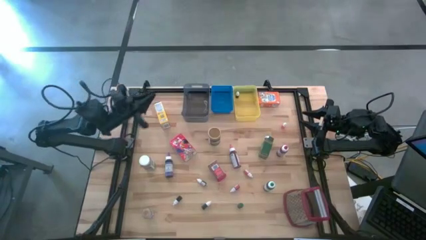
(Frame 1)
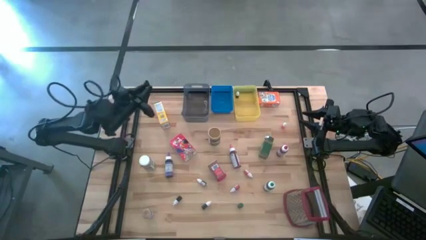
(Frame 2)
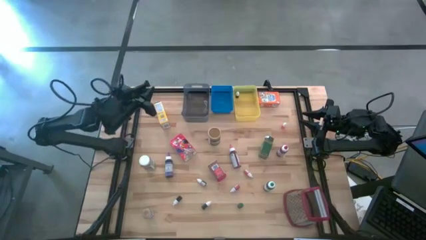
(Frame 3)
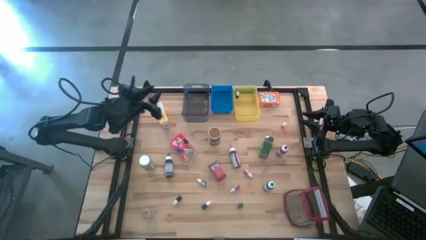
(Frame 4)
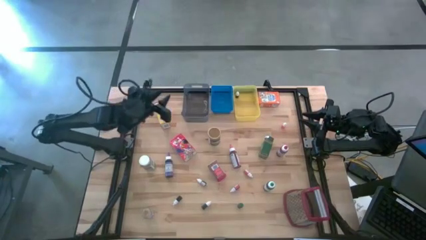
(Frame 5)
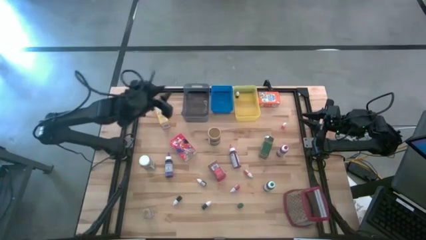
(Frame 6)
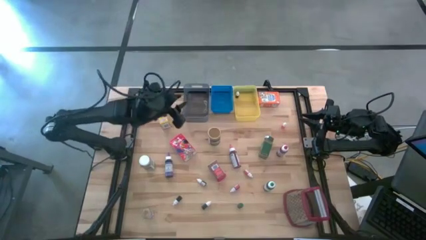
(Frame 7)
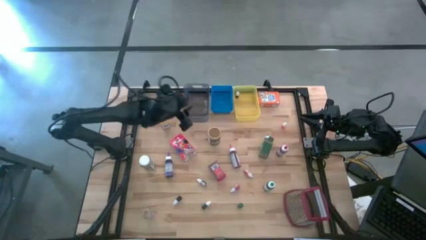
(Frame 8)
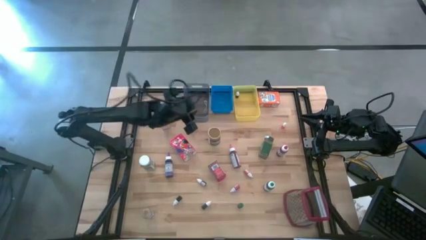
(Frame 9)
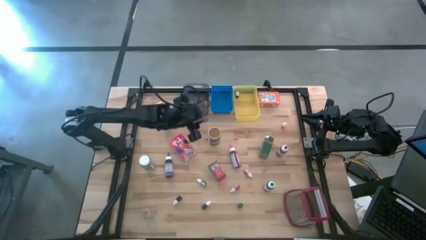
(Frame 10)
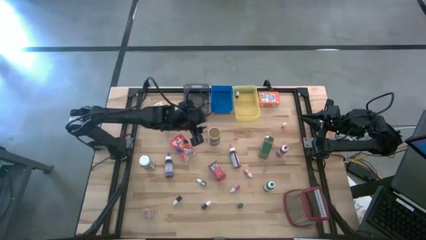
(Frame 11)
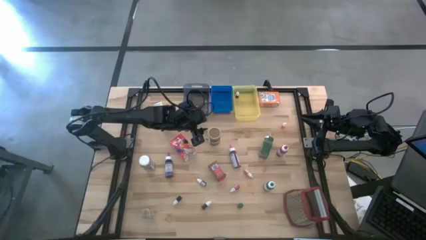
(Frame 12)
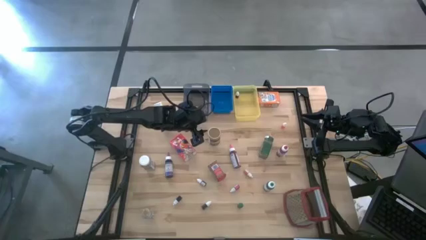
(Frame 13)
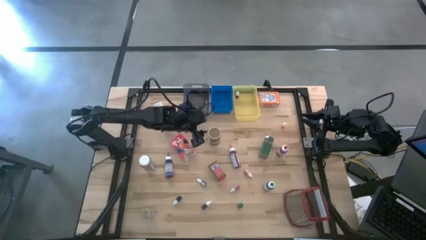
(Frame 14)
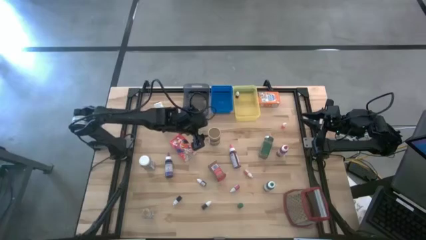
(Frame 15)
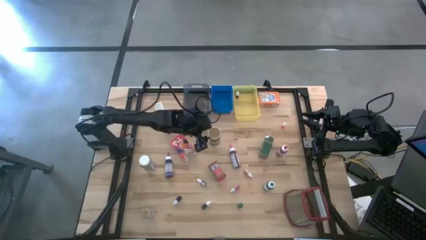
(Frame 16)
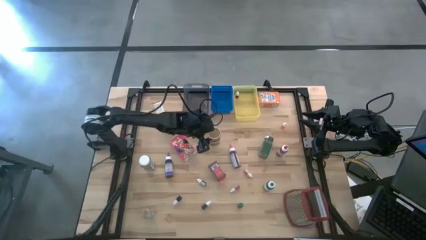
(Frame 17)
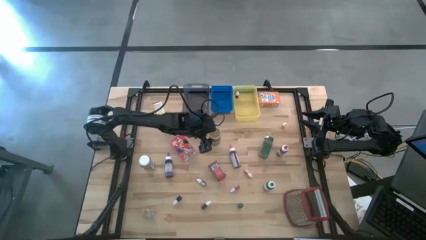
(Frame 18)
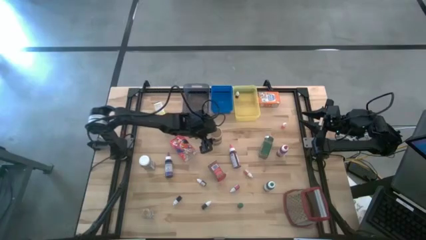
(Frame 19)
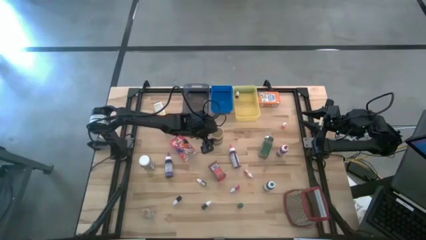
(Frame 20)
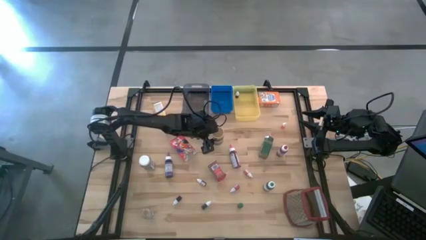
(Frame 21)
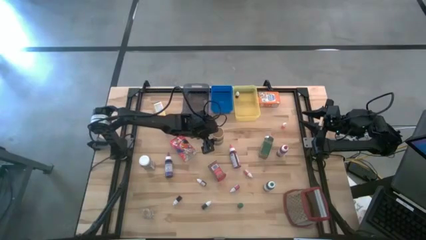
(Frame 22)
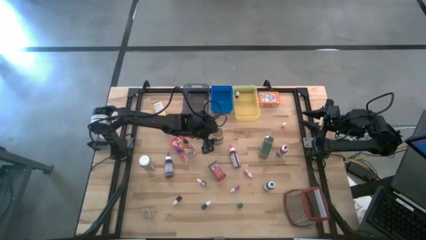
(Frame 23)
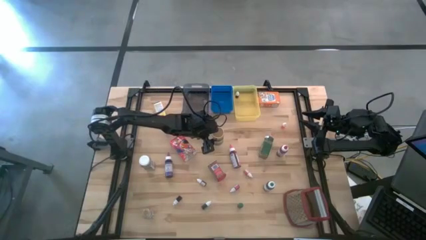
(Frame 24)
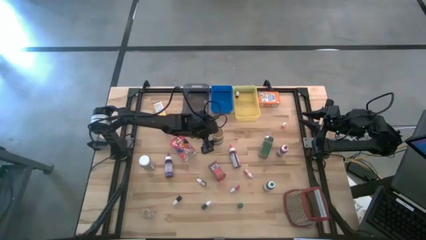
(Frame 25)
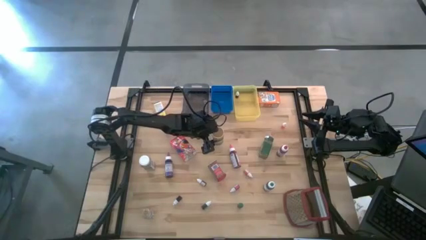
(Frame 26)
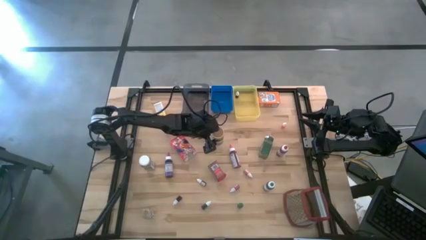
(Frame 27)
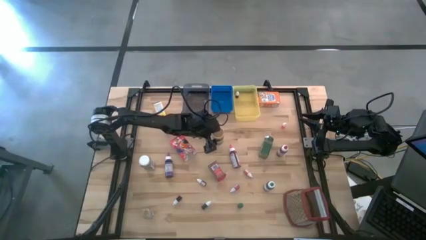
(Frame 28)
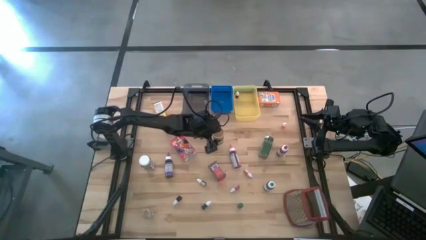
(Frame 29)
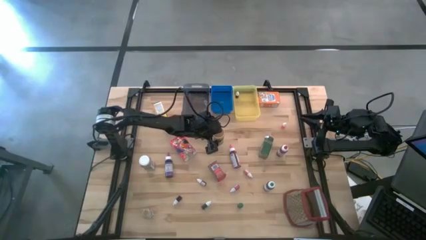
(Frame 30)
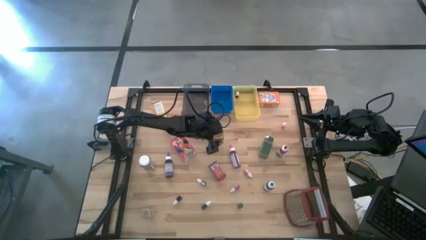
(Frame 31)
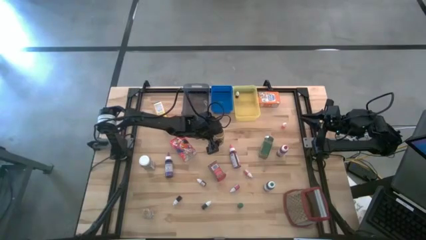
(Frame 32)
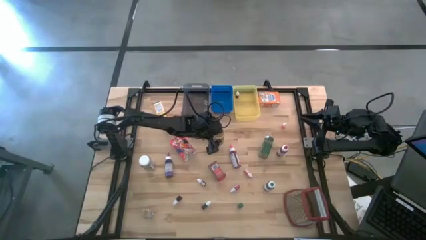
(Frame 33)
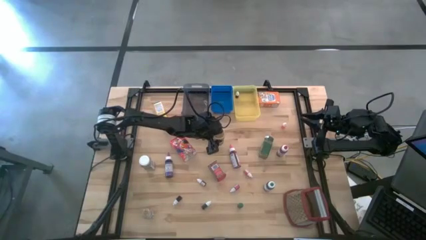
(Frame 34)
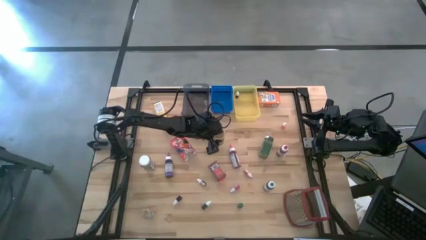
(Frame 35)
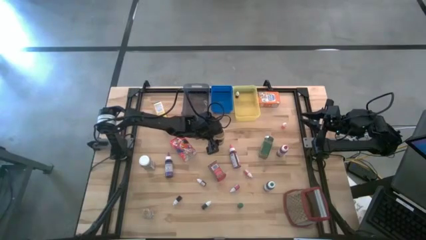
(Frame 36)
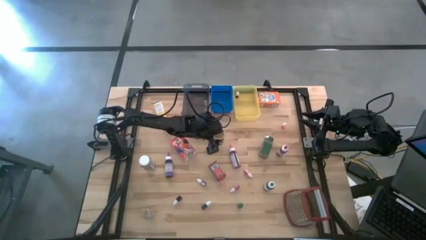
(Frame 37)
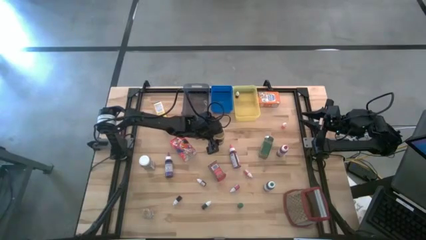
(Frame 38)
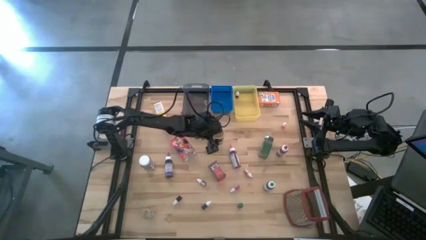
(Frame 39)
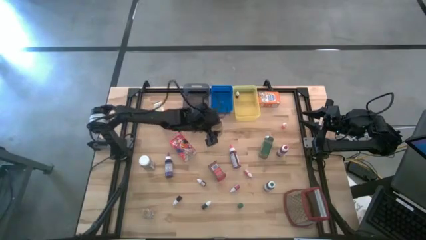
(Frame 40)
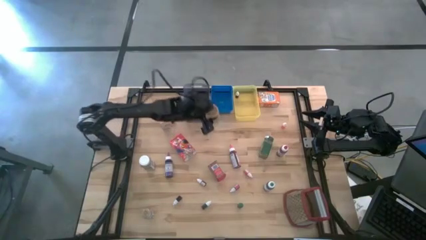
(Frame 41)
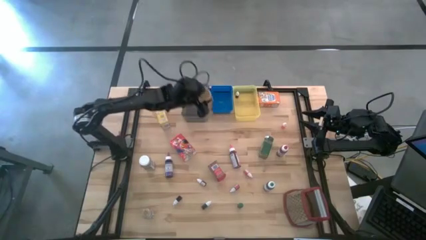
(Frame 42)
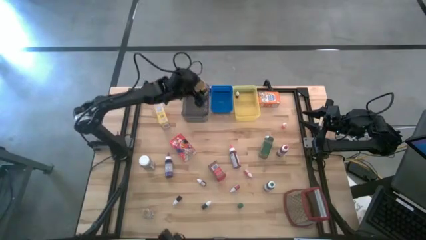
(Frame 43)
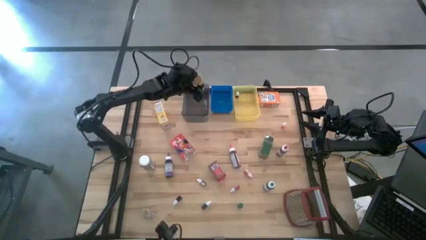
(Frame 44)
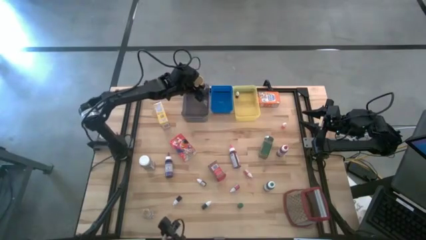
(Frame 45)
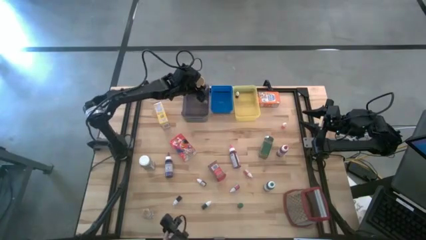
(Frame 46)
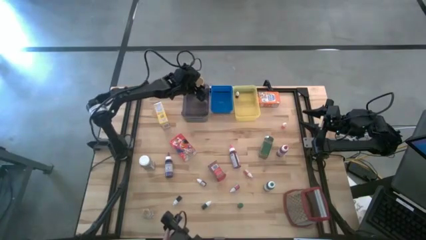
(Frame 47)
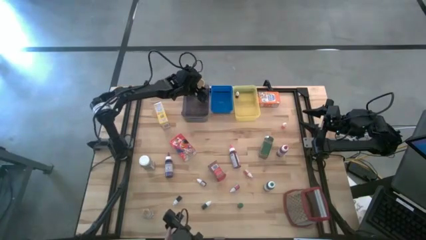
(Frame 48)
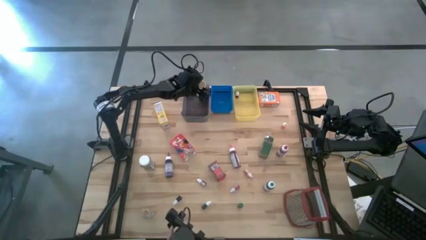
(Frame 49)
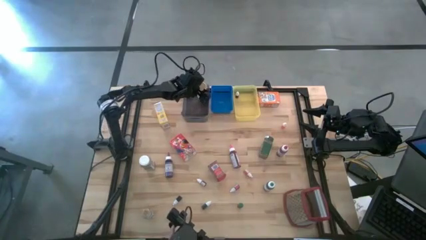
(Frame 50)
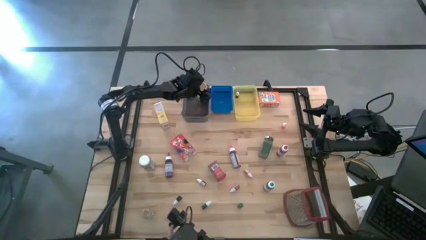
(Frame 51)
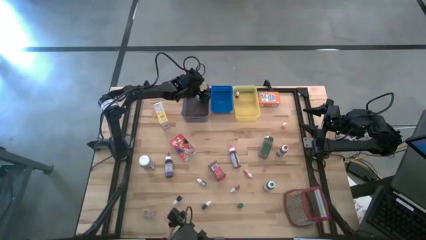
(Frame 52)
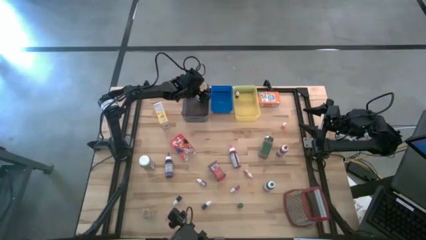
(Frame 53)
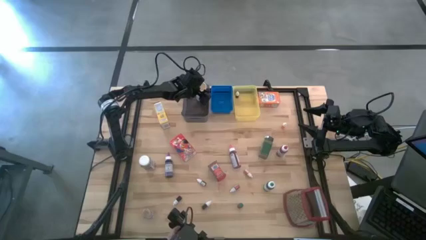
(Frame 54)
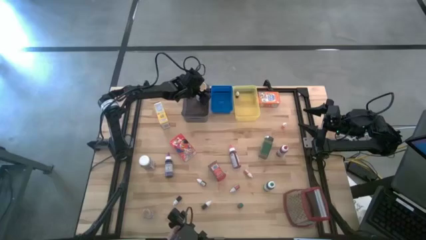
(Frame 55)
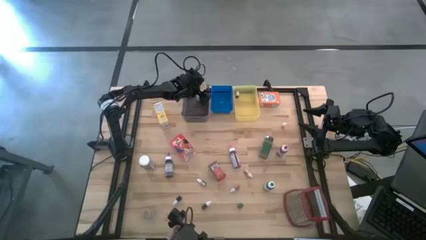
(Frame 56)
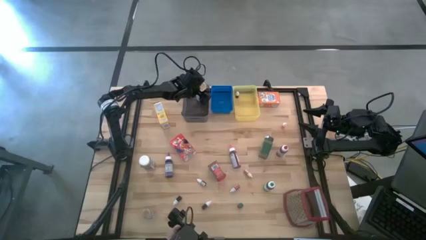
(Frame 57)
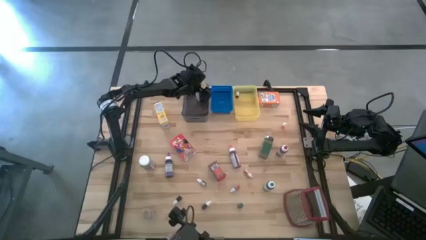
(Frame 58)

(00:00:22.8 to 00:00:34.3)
Task: Pick & Place Kitchen Items
Put the gold spice bottle into the black bin

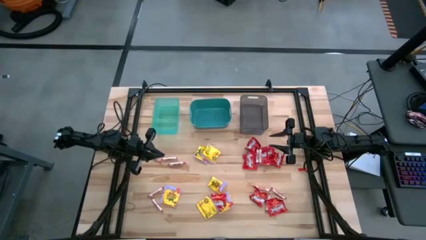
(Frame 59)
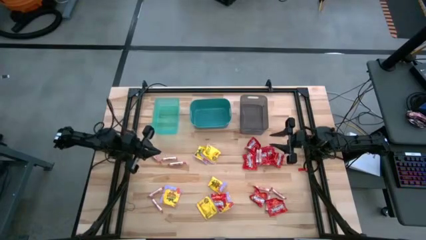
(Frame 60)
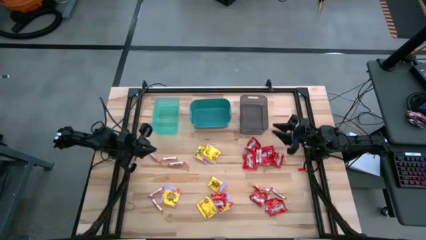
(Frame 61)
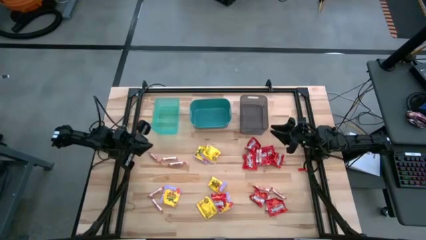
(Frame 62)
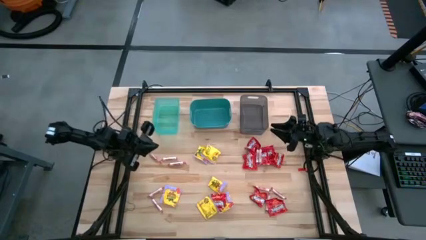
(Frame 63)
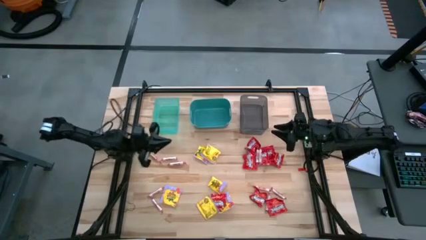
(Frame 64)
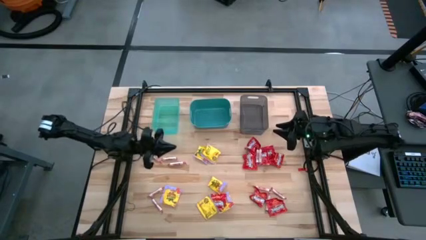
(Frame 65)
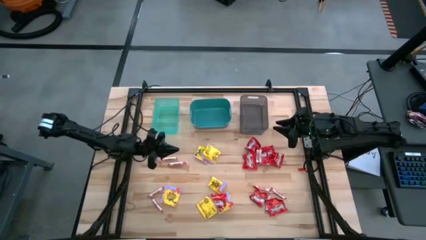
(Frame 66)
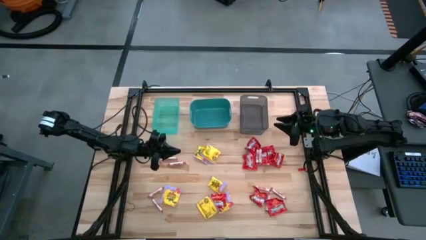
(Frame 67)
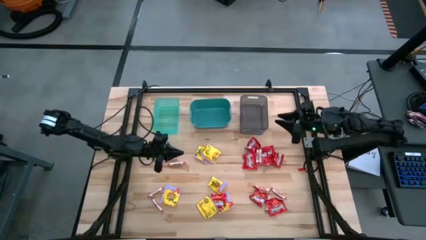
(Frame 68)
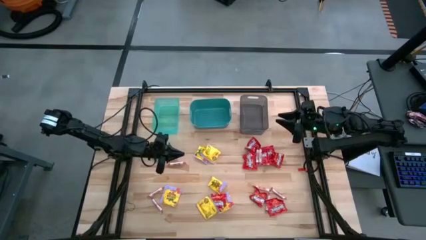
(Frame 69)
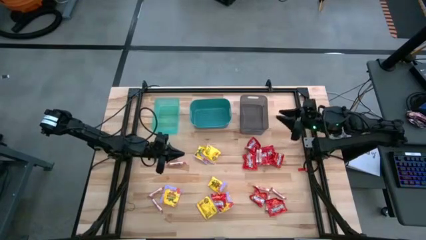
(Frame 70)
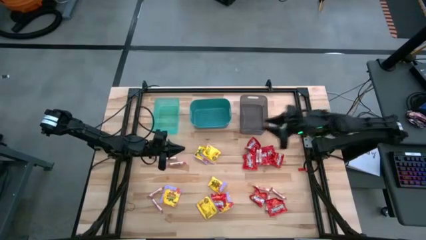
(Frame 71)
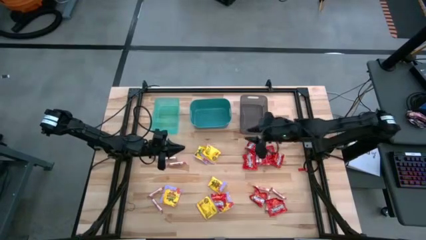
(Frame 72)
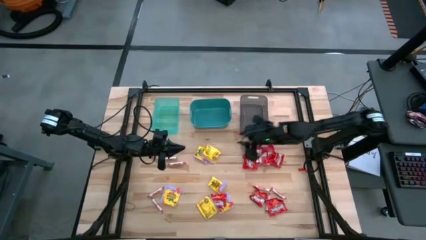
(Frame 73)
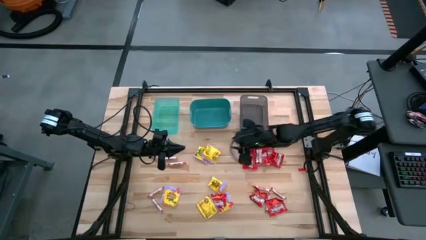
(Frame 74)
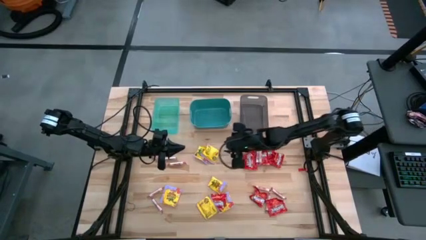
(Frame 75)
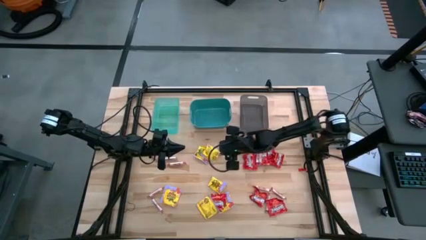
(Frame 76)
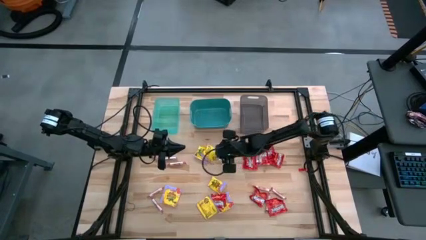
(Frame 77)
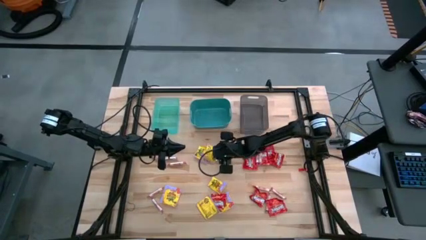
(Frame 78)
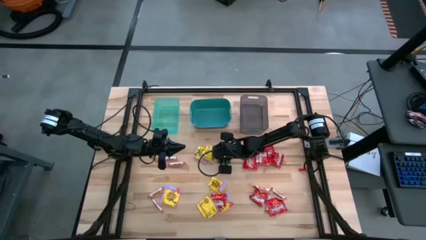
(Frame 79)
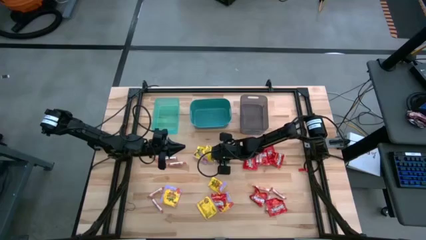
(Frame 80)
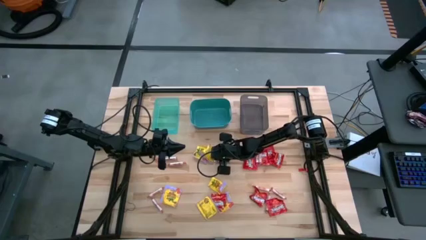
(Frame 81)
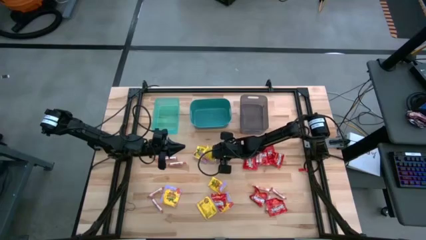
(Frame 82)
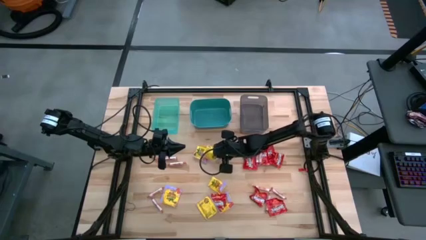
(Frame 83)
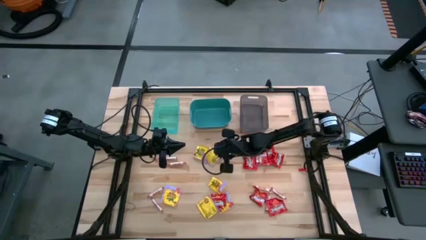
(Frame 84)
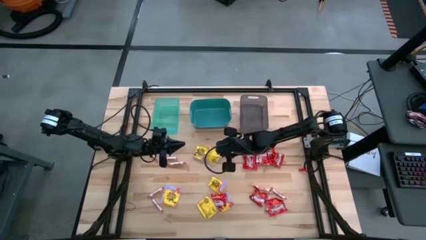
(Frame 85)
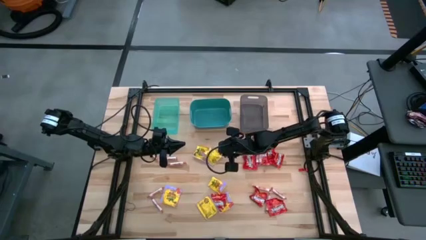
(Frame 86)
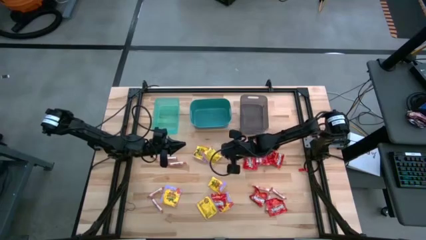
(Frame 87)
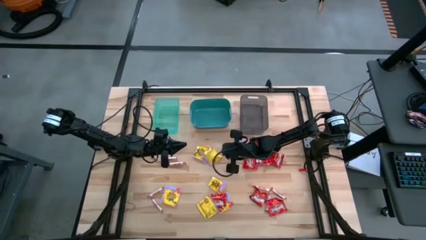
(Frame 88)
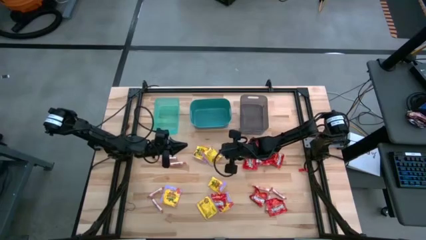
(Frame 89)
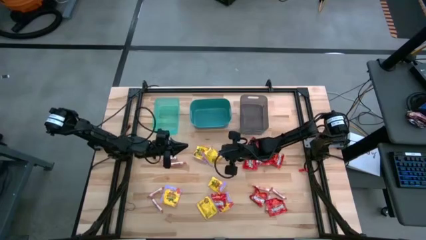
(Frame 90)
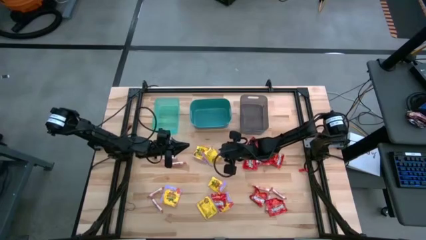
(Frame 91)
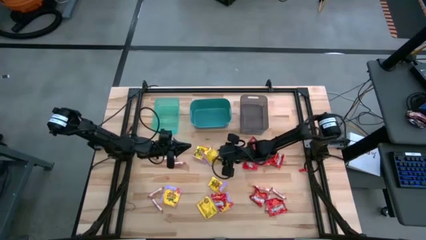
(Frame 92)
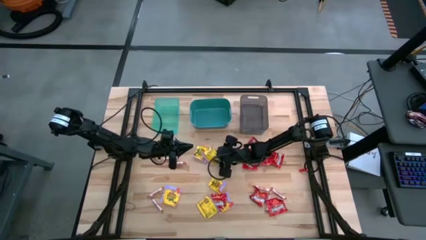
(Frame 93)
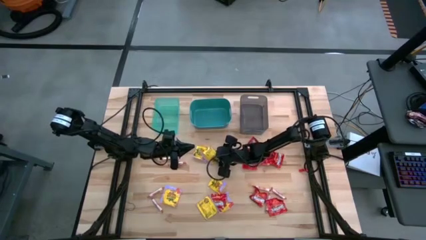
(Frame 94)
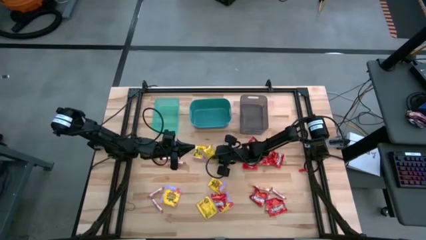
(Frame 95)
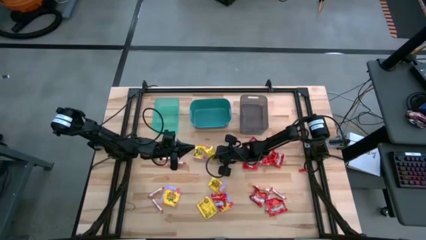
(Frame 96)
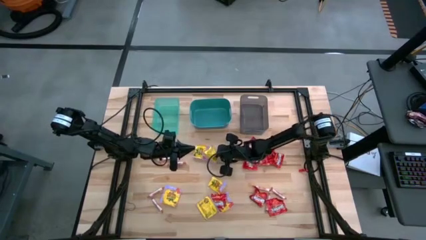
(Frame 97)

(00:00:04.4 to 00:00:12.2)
Task: Sort candy
Put the yellow candy into the green bin
